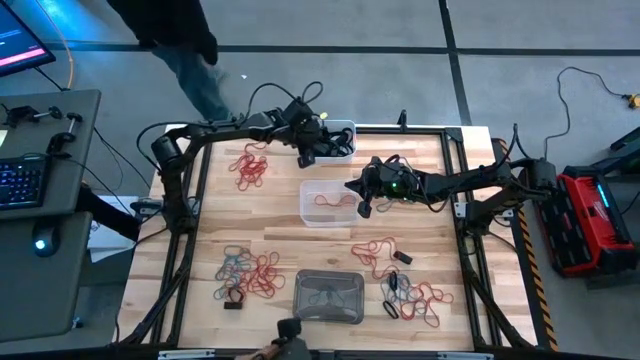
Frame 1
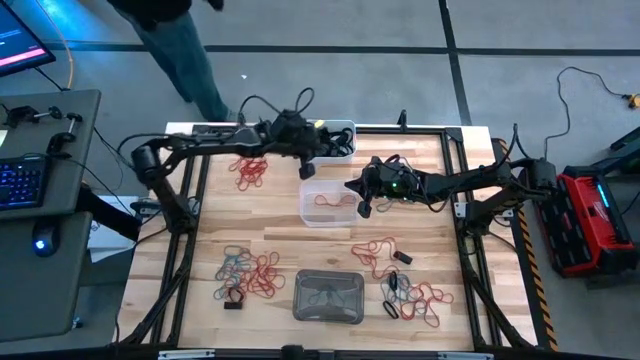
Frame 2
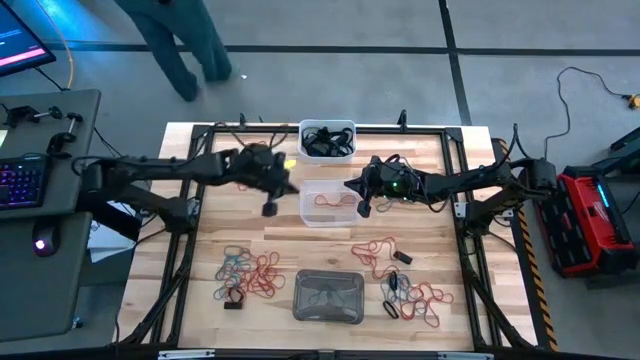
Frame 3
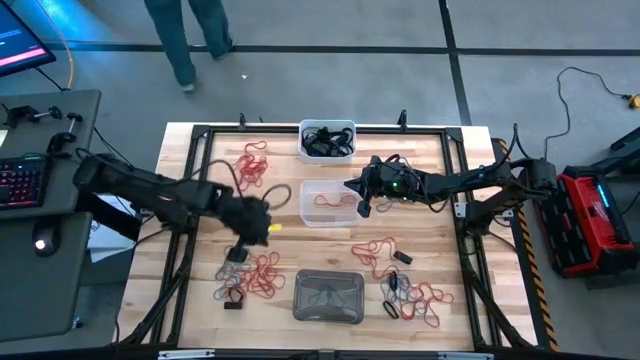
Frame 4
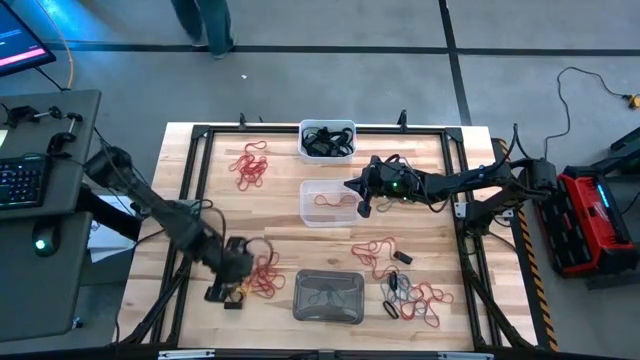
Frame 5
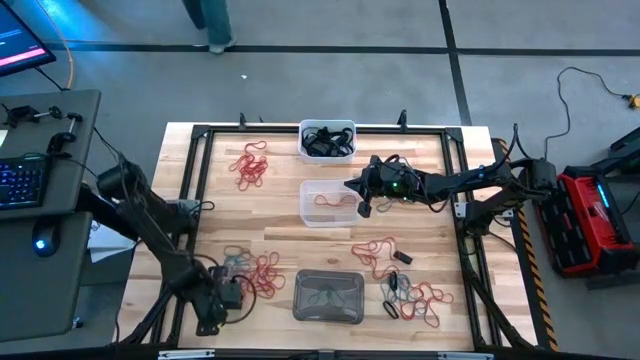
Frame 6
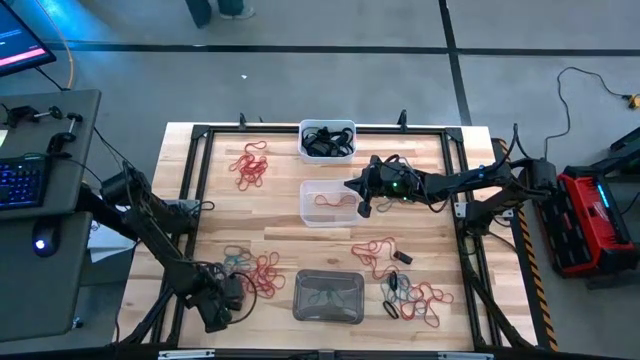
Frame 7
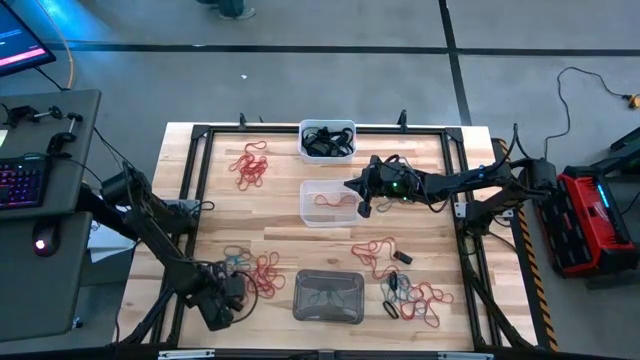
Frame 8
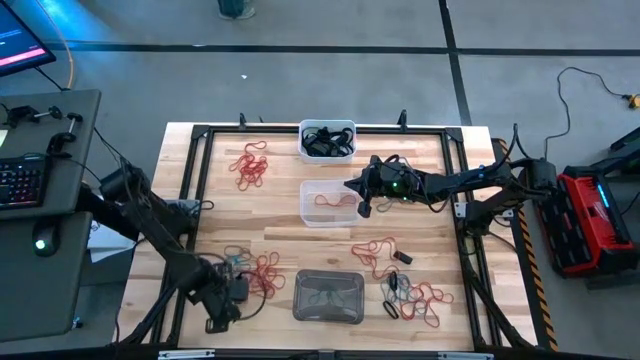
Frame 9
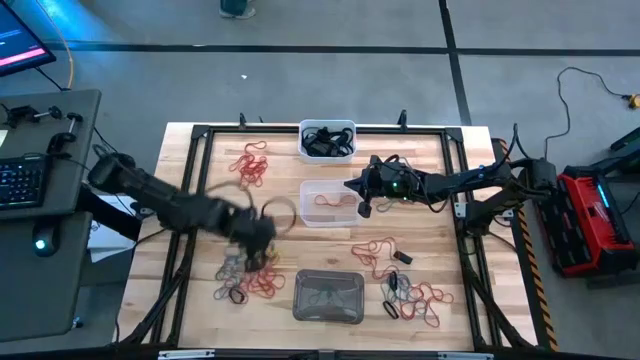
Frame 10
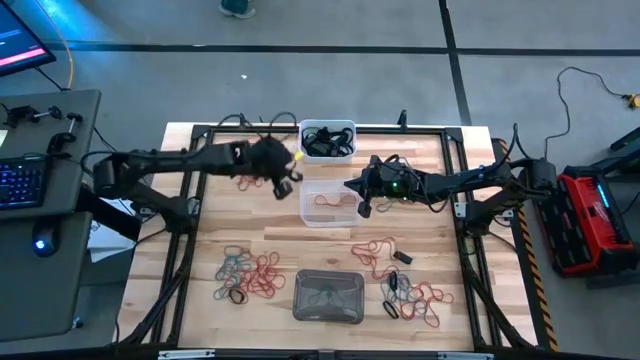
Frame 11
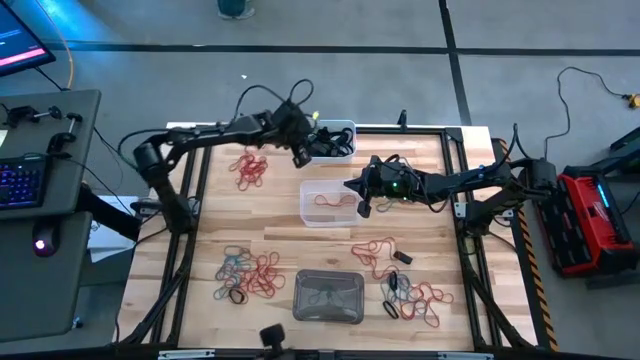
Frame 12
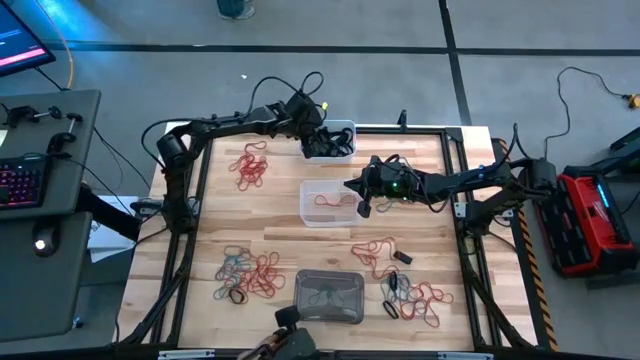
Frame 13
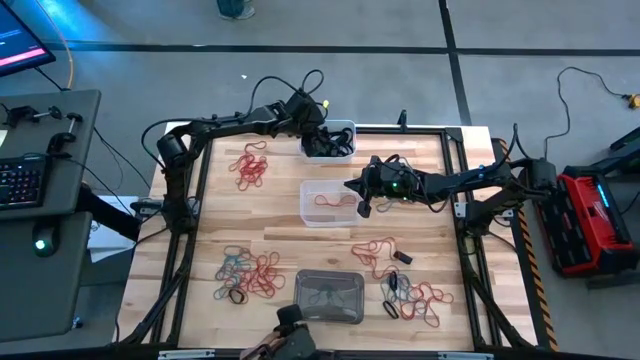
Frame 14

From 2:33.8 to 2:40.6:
Task: Sort rubber bands into baskets
Put the black rubber band into the white bin

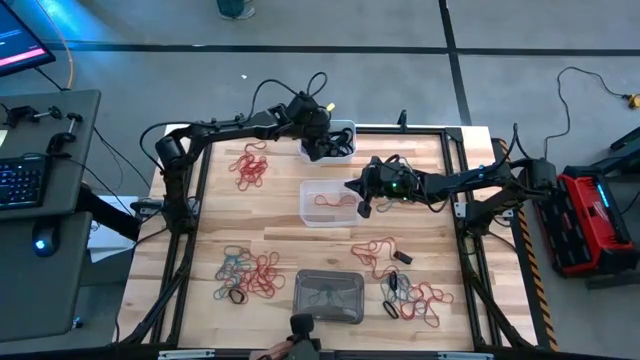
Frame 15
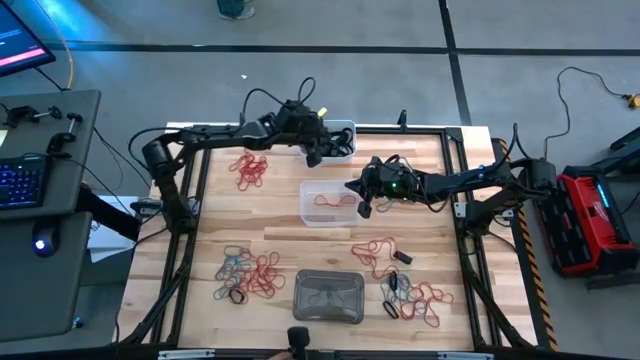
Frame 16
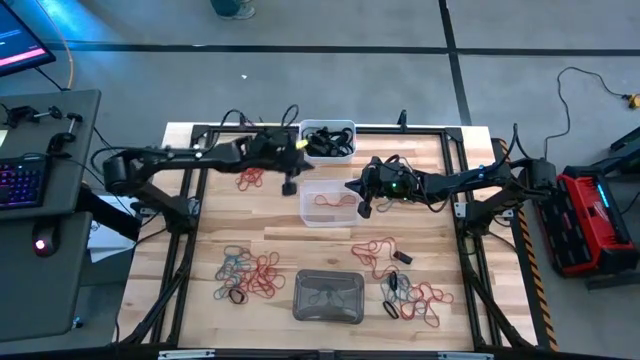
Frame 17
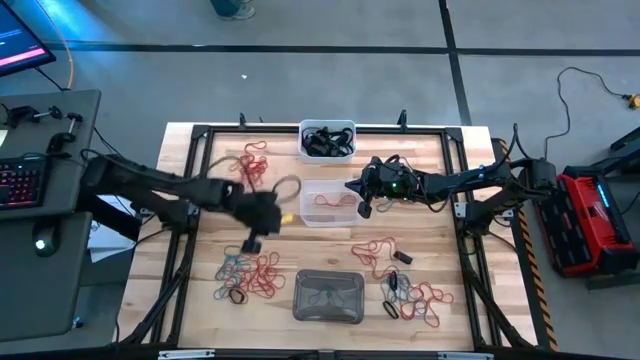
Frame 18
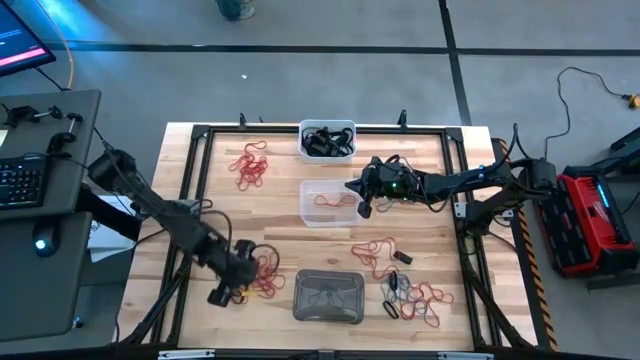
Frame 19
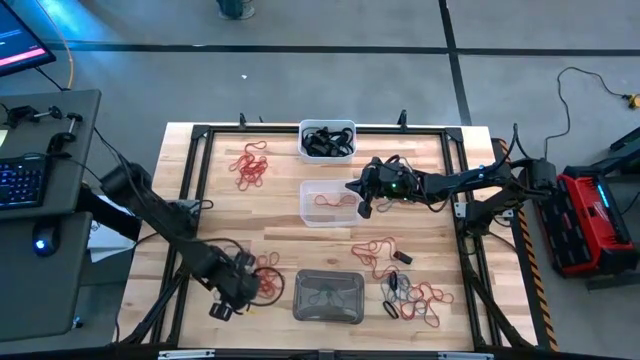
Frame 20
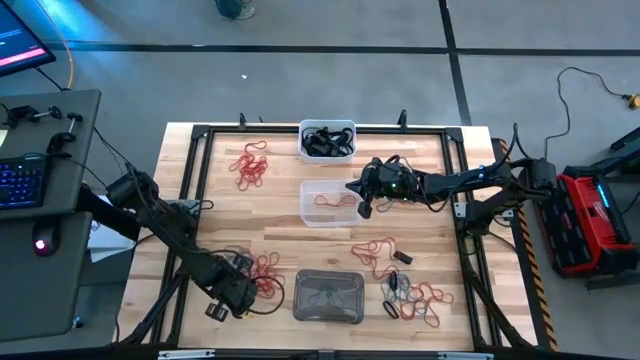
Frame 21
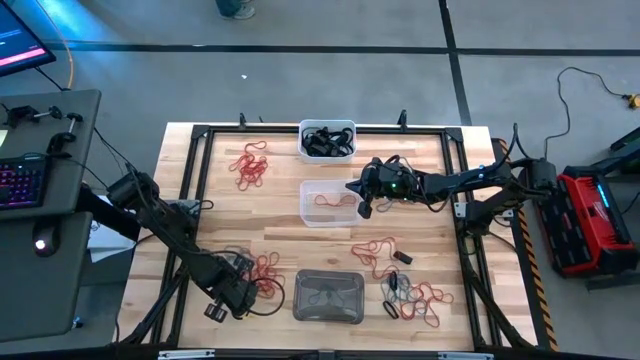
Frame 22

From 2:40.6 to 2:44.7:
Put the black rubber band into the white bin

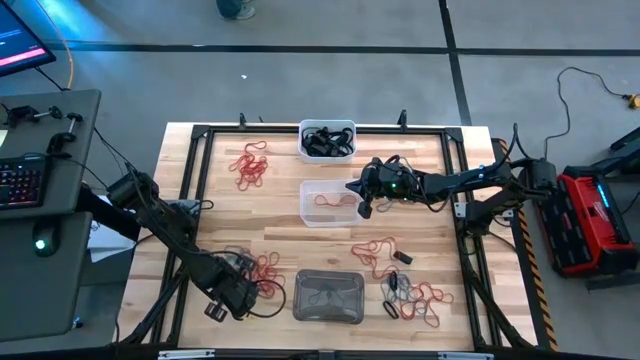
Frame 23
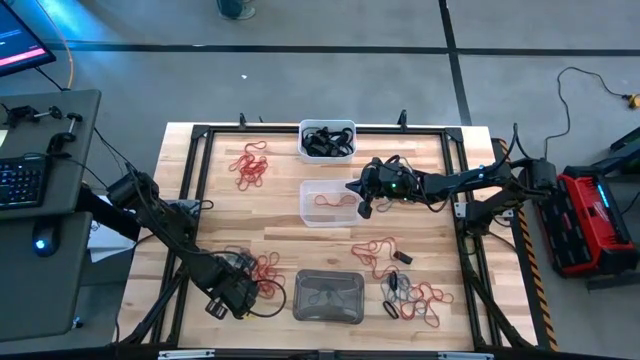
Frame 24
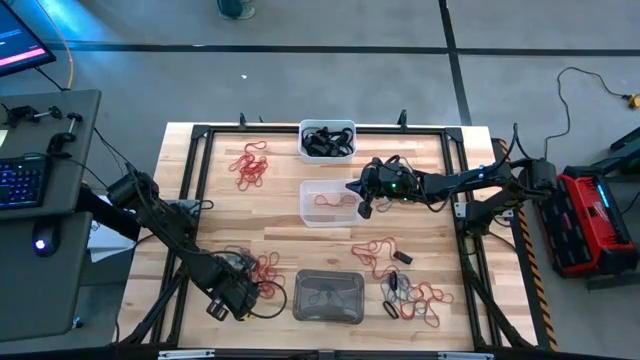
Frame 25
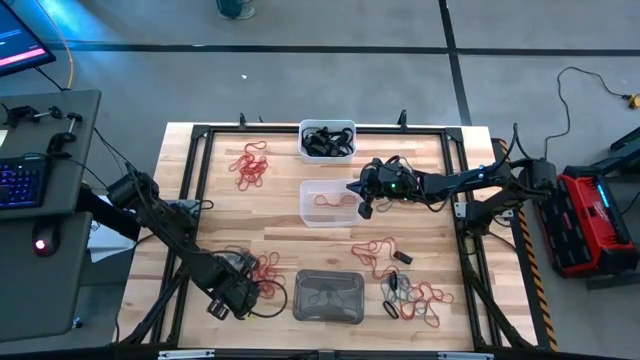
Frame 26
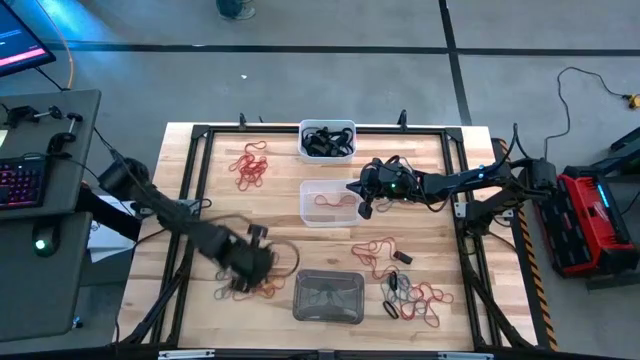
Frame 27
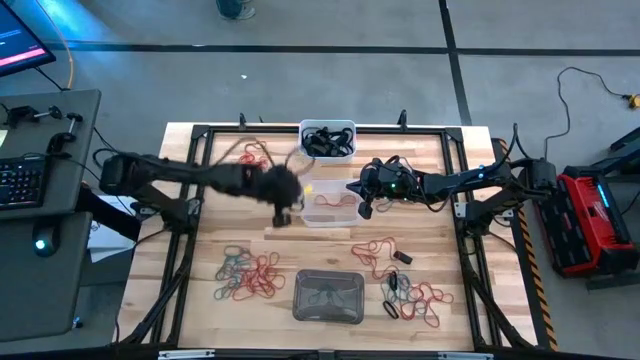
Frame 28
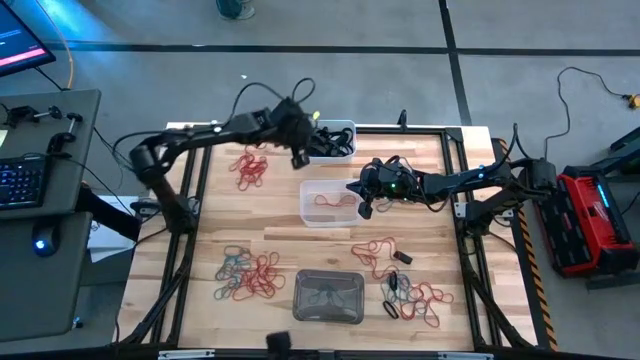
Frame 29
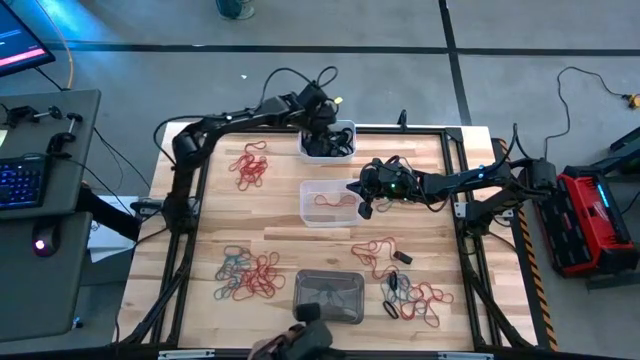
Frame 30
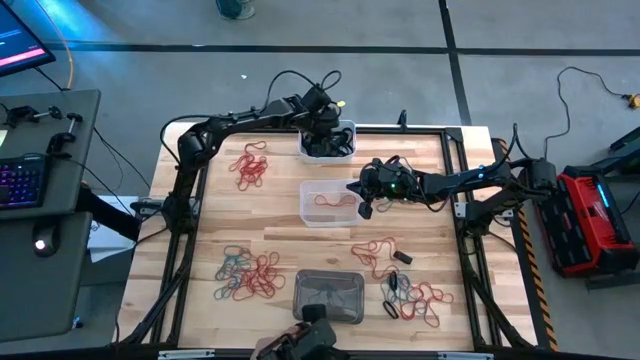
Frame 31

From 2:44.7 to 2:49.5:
Put the black rubber band into the white bin

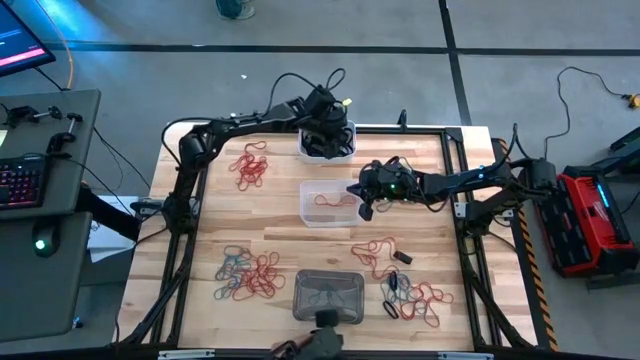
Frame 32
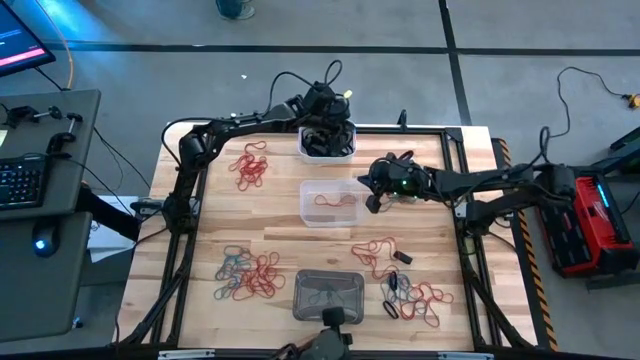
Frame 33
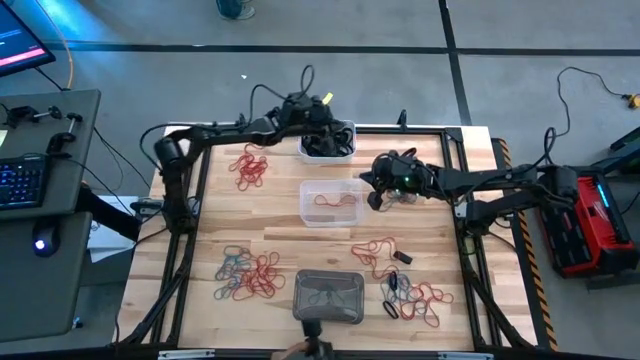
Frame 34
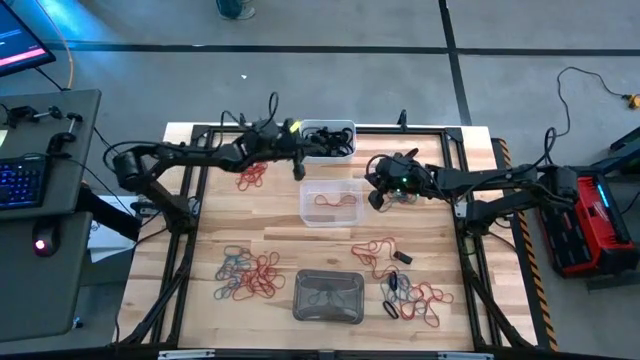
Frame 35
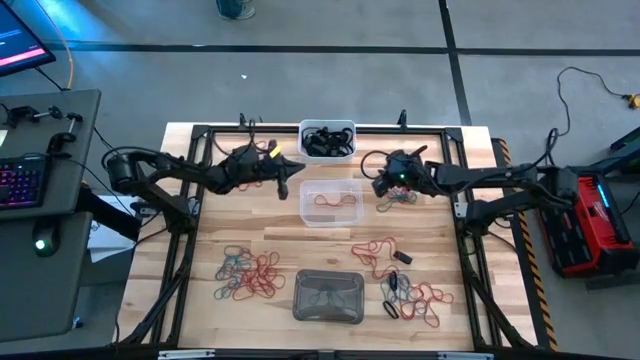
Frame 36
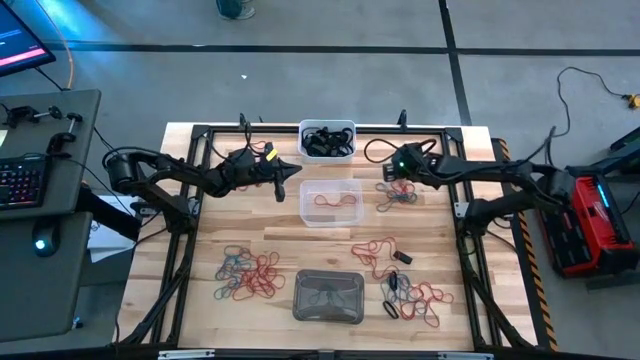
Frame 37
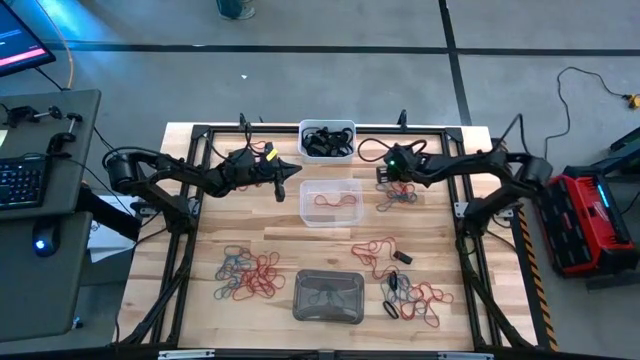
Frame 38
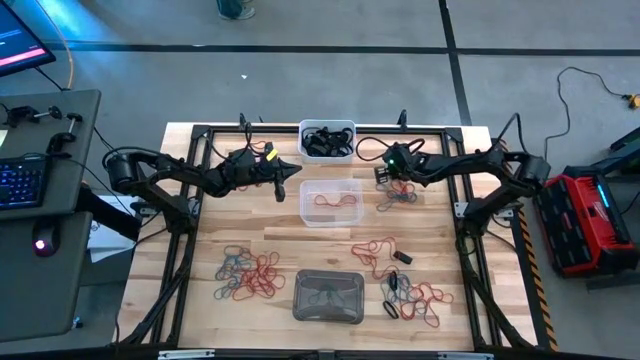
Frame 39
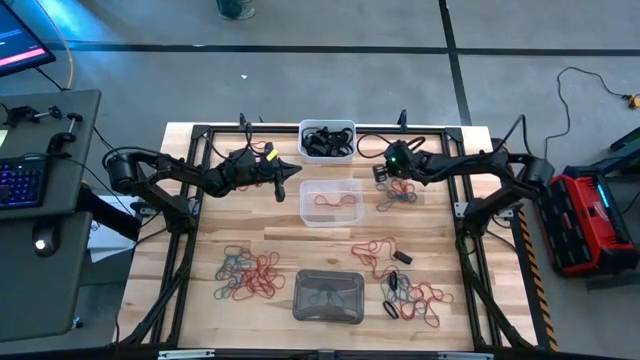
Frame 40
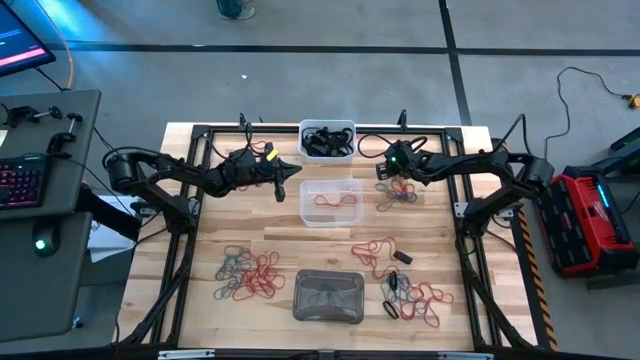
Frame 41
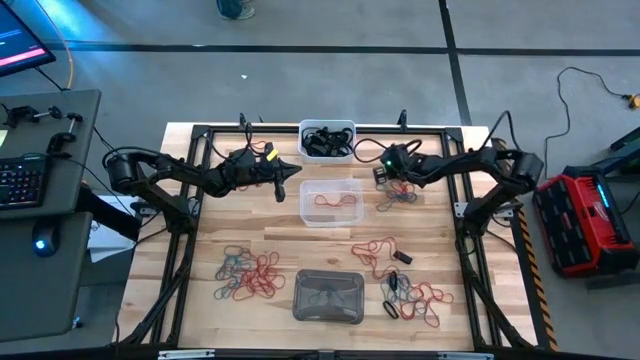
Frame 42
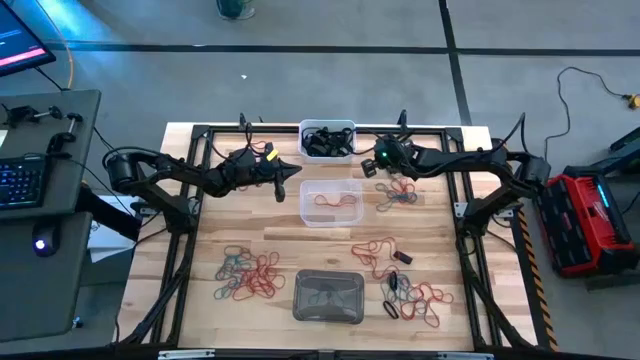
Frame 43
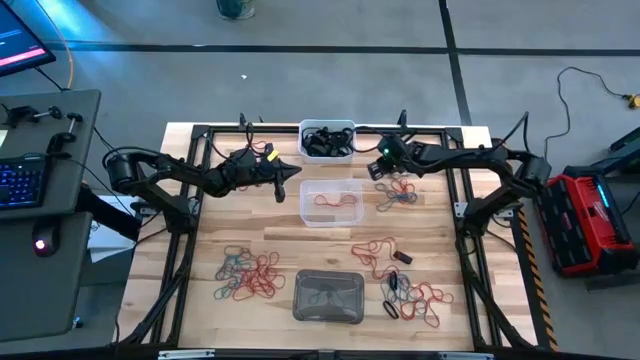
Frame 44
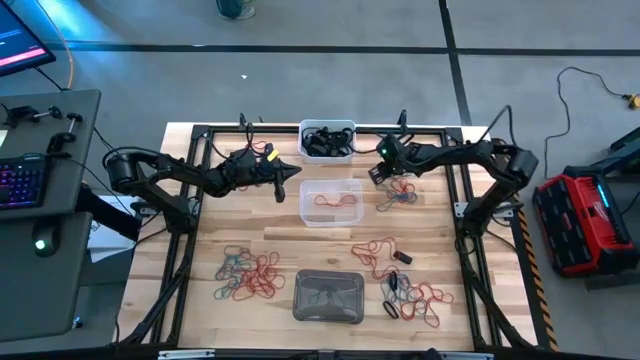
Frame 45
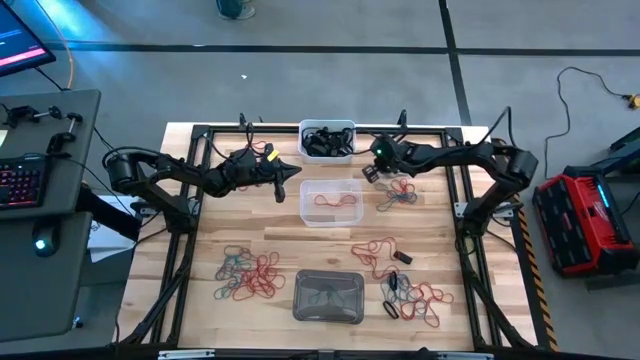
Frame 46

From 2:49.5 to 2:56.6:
Put the black rubber band into the white bin
